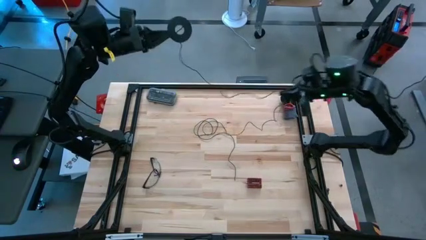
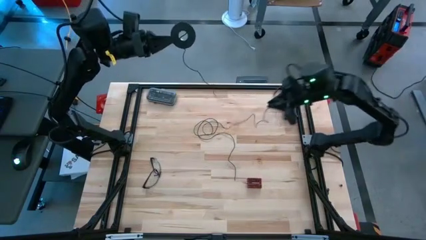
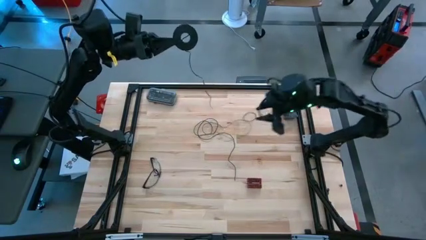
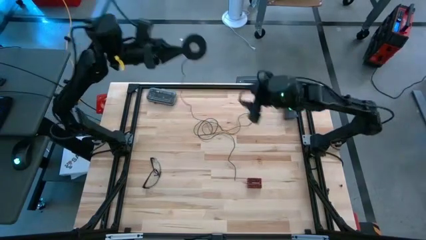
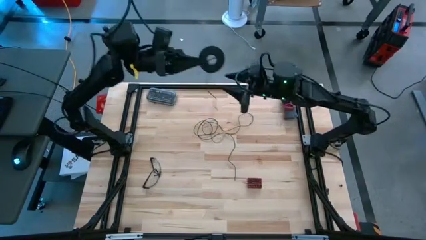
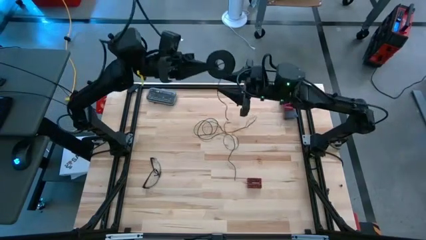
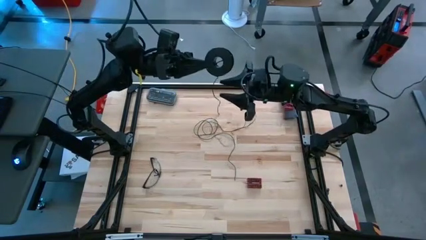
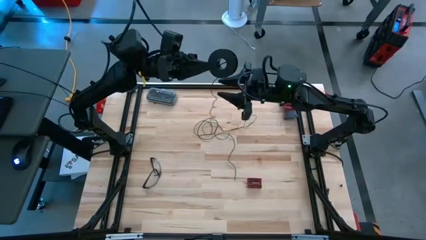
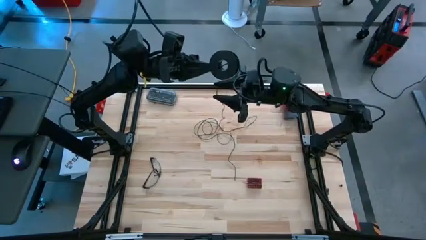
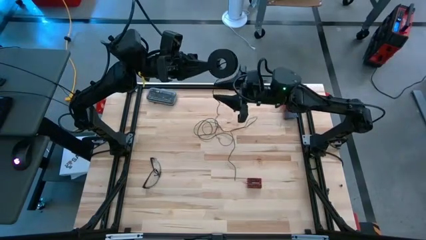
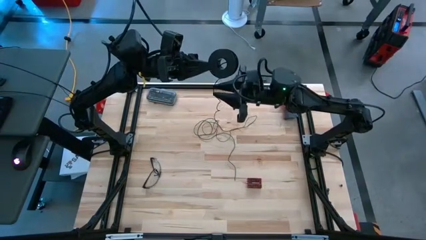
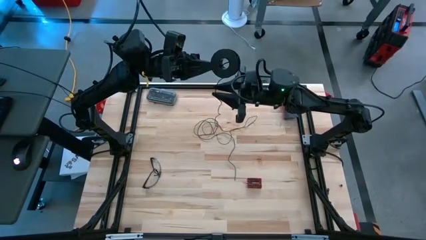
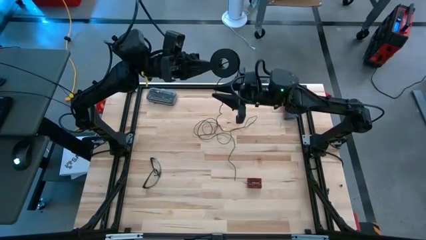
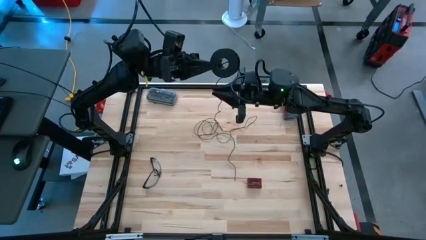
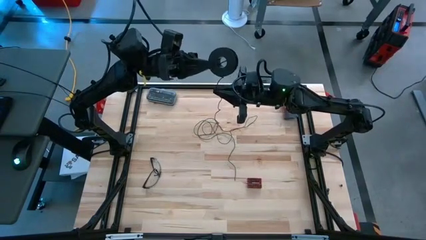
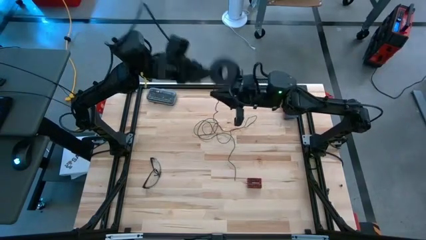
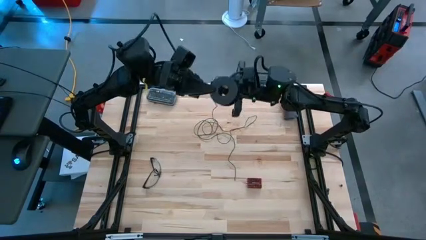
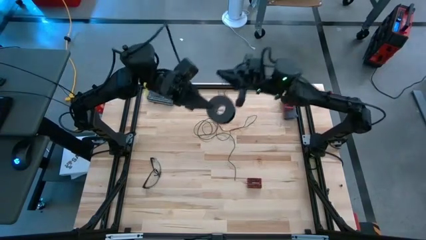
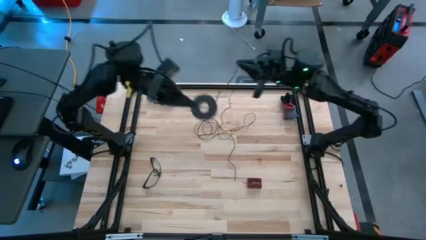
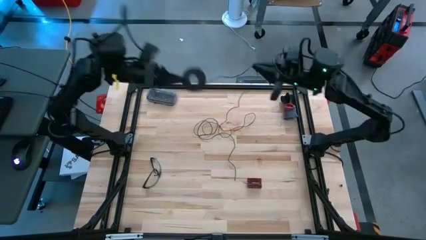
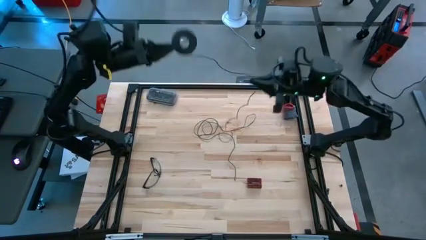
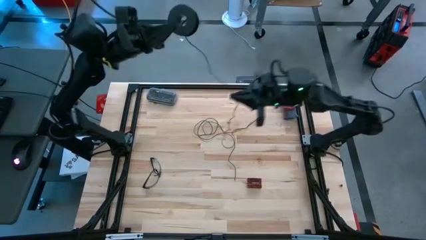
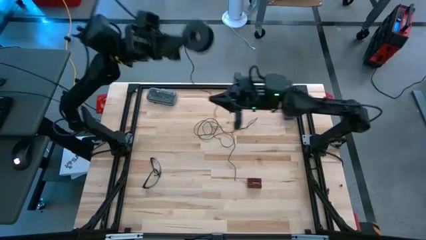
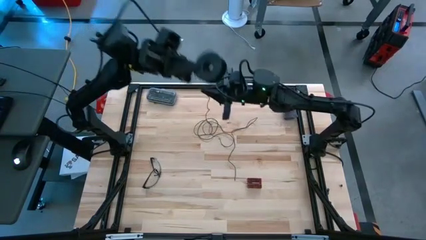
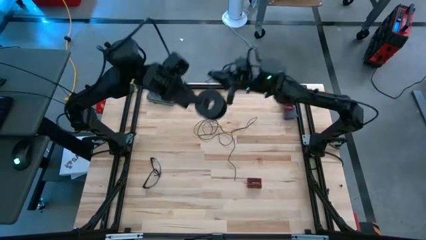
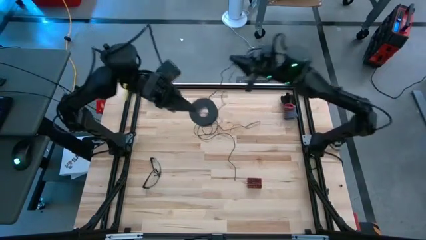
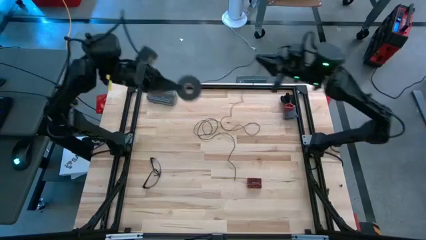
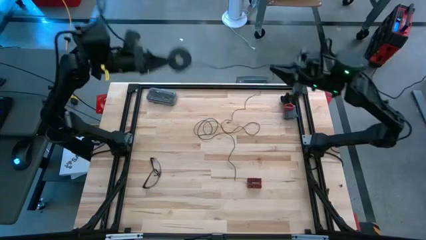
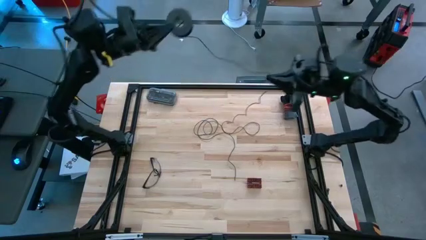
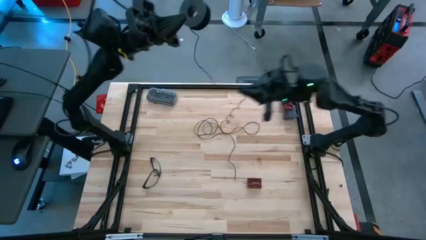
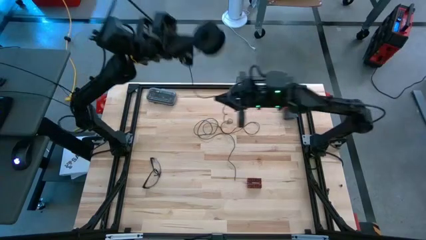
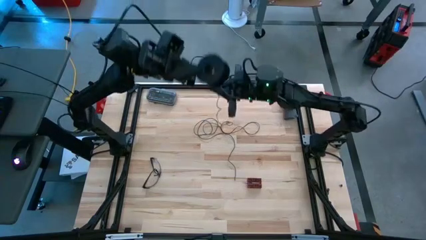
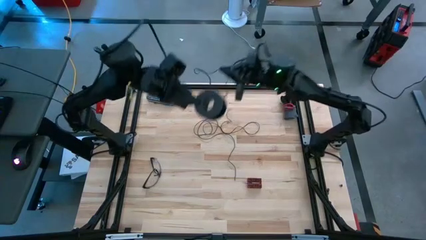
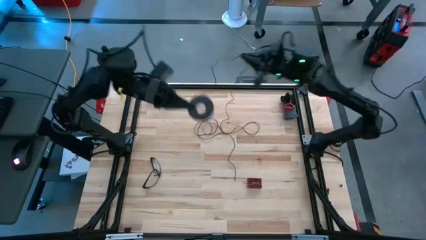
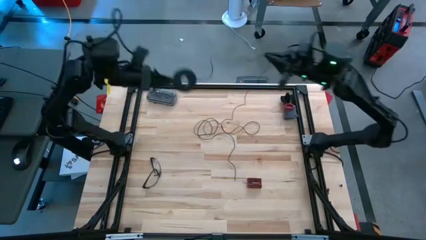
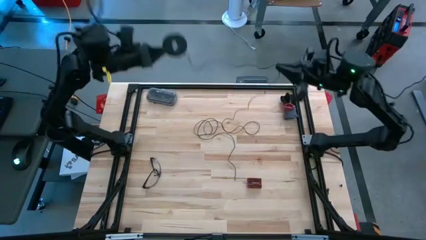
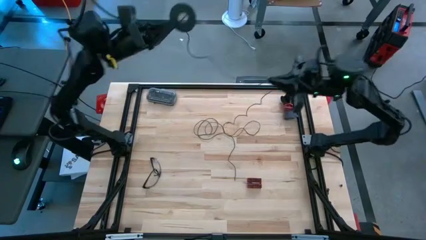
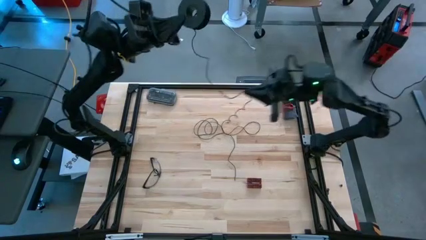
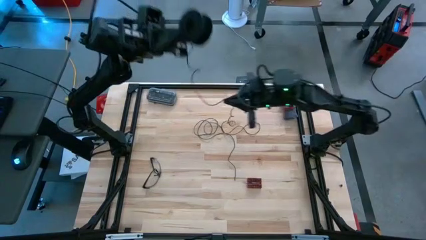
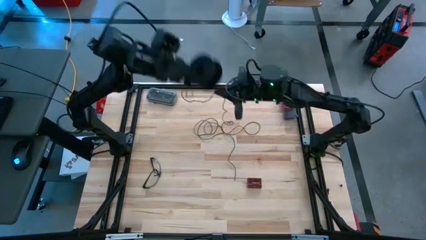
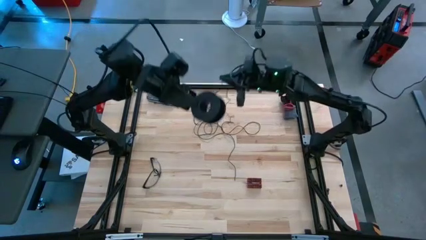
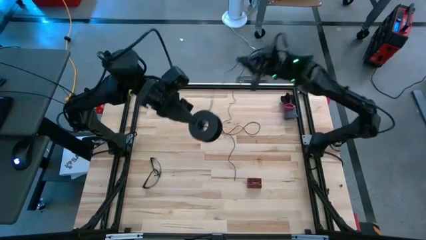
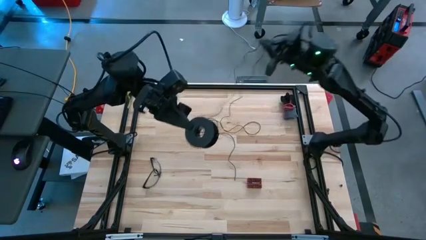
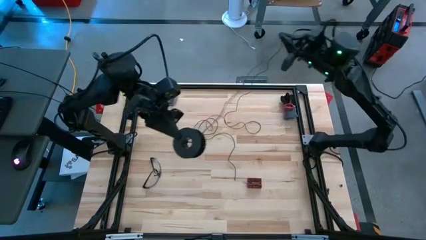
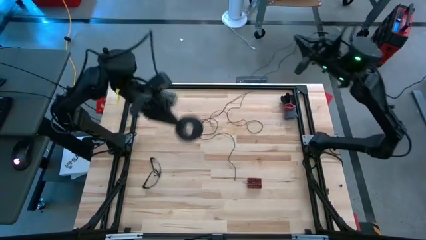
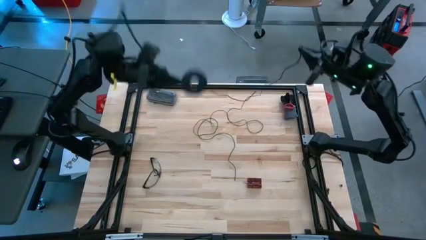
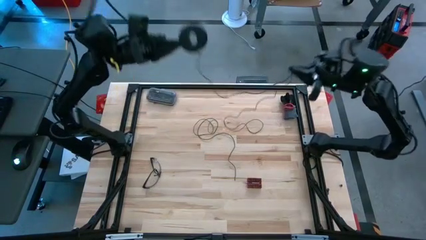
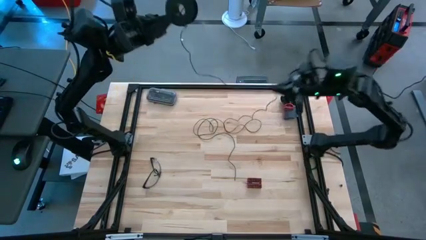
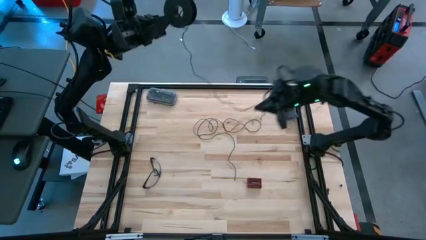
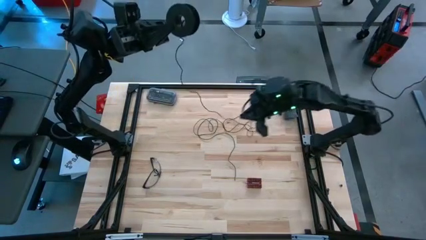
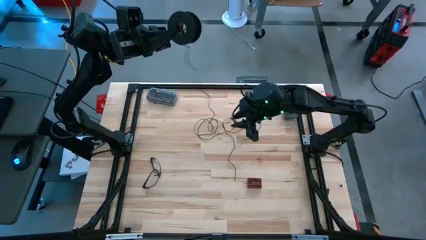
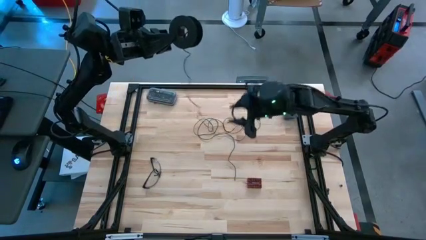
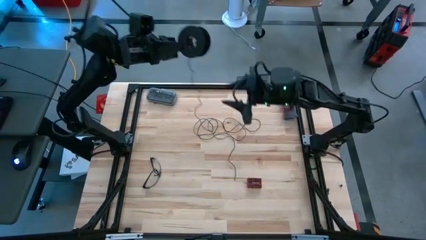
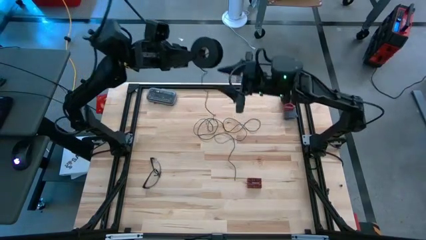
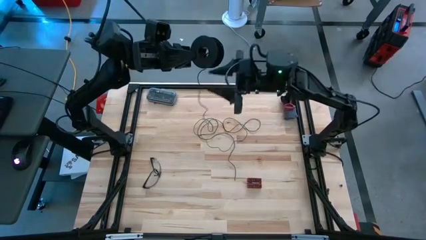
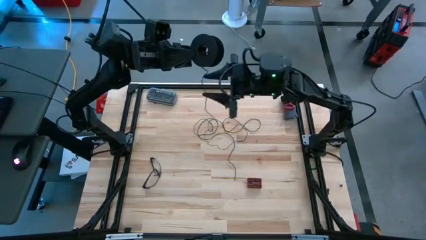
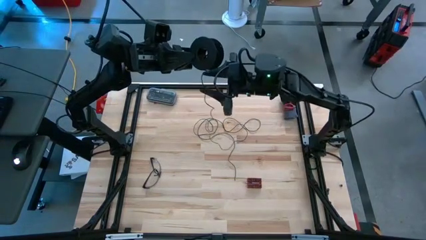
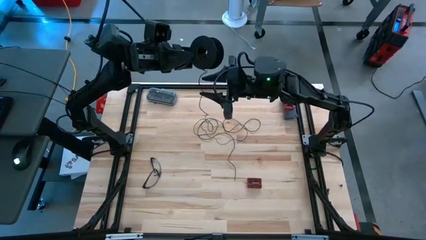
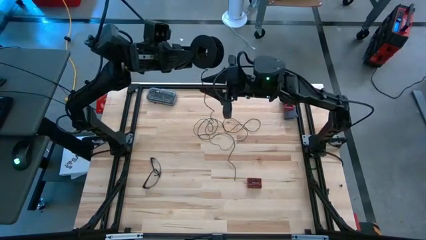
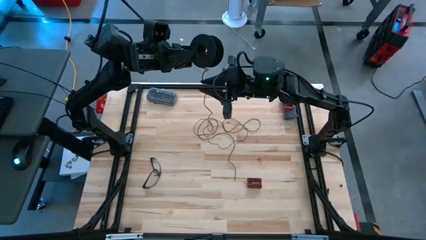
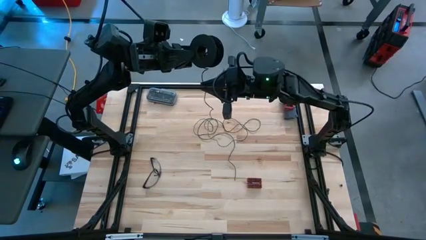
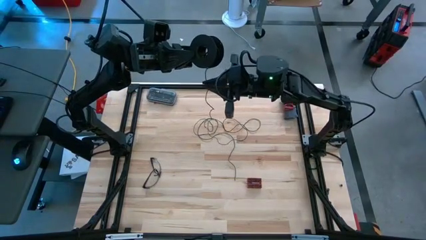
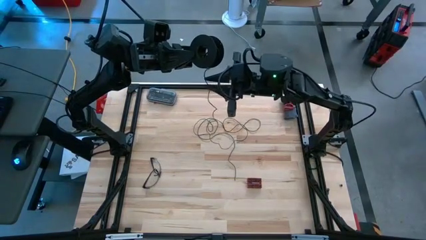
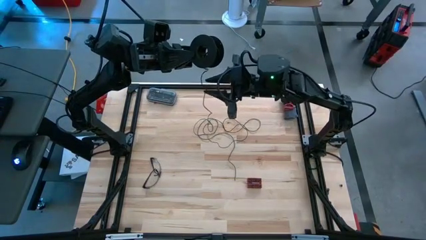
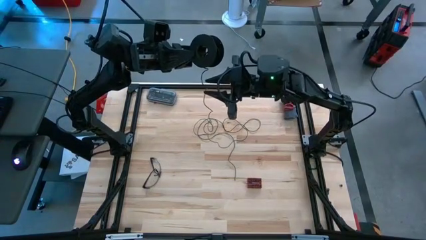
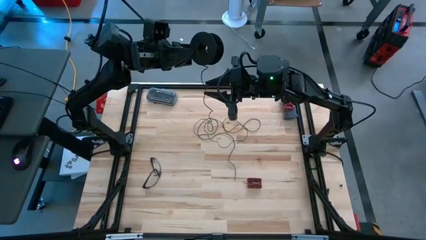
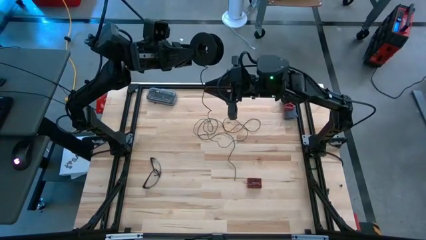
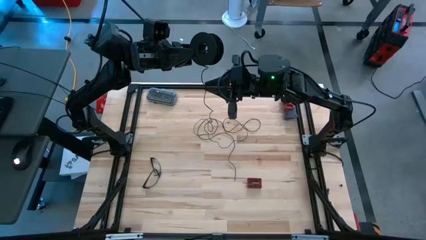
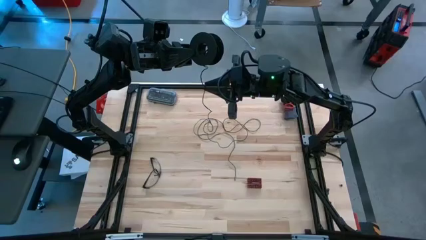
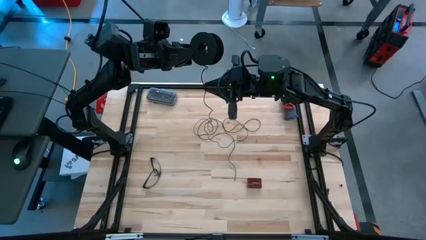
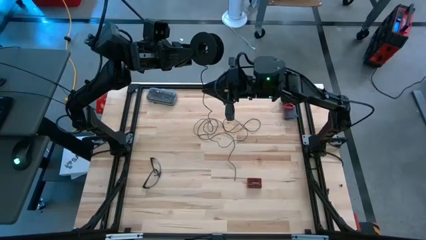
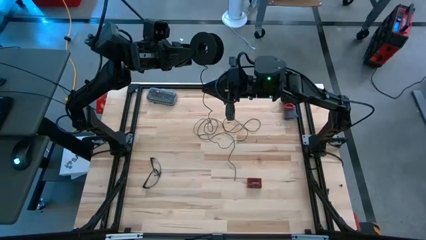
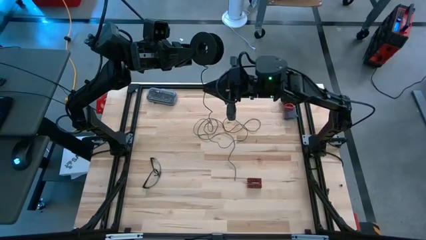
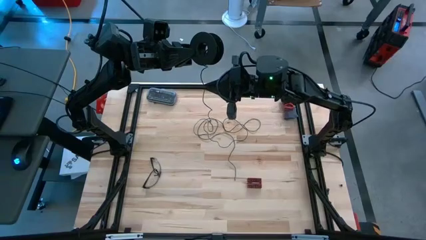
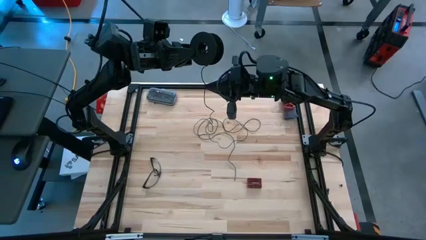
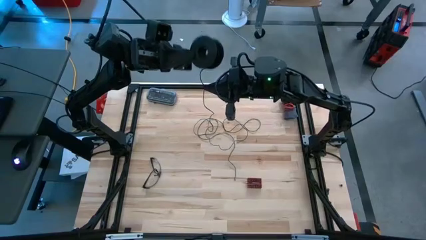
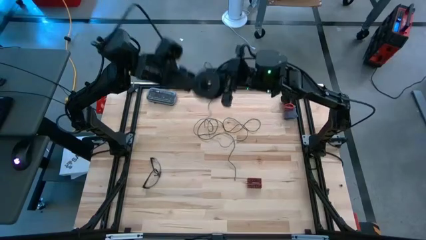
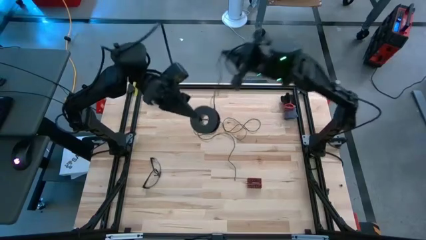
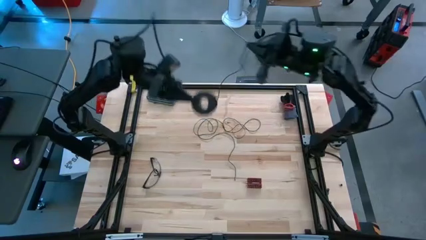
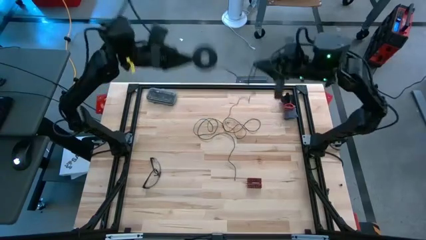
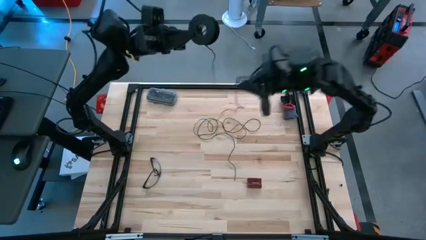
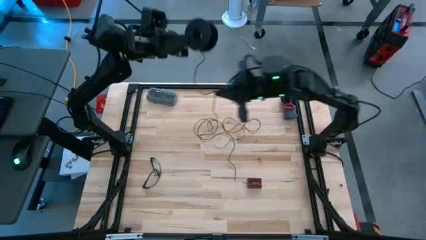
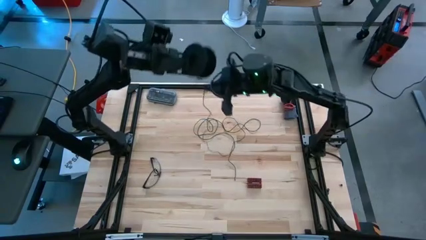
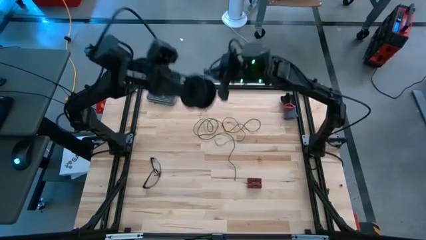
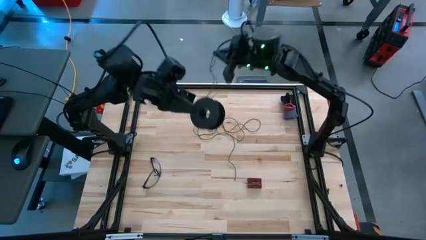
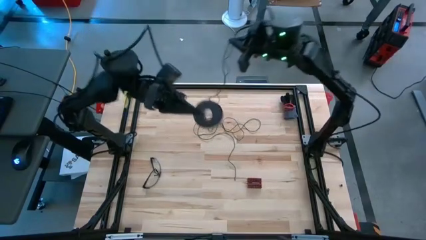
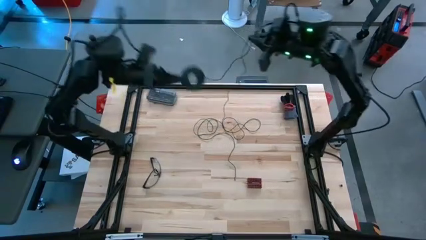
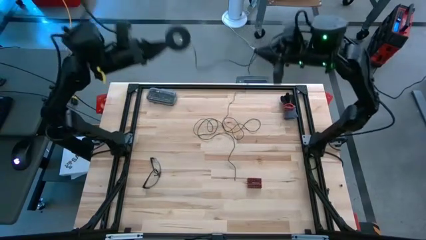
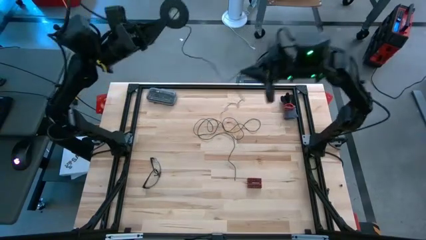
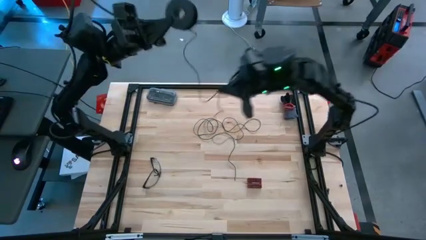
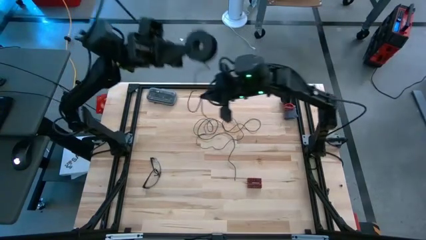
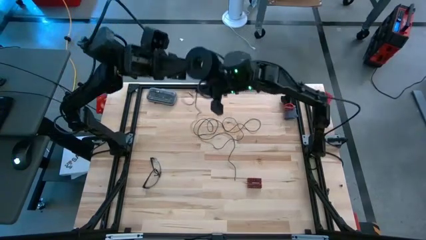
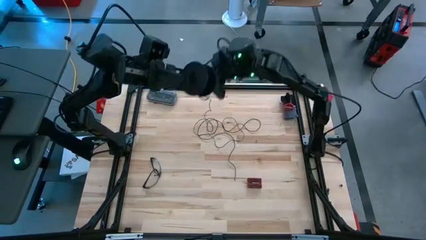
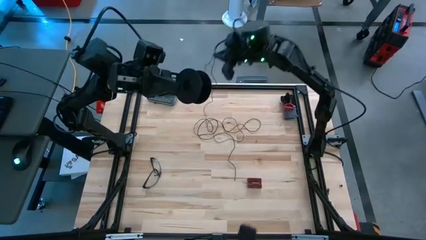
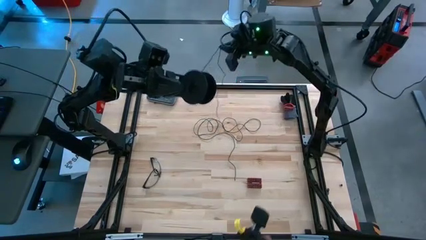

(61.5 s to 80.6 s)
Task: Coil cords
Uncoil the black wire from the spool
